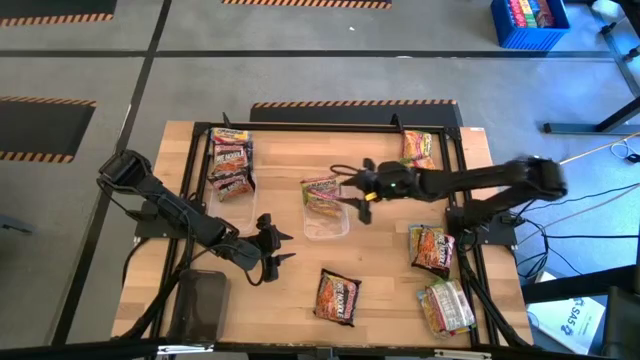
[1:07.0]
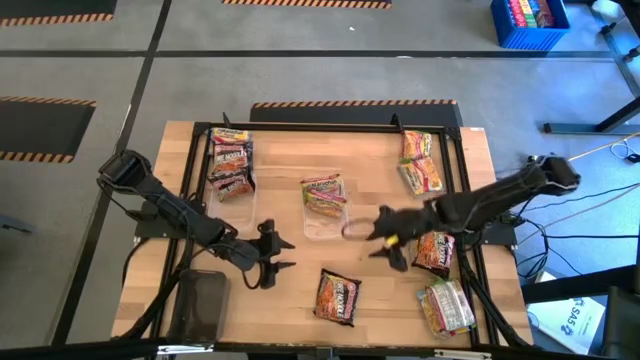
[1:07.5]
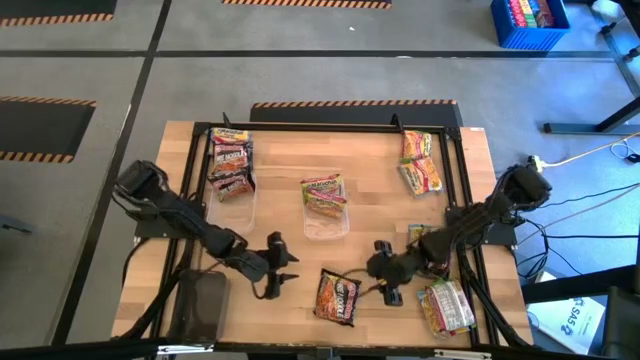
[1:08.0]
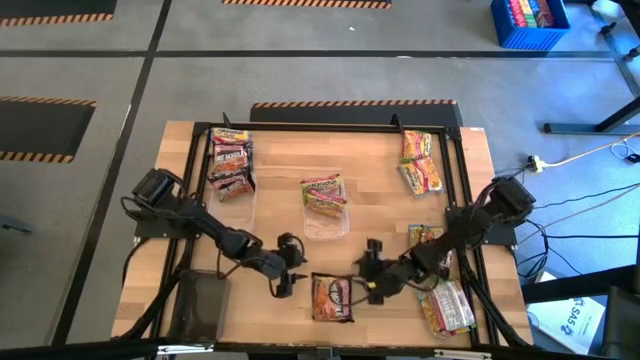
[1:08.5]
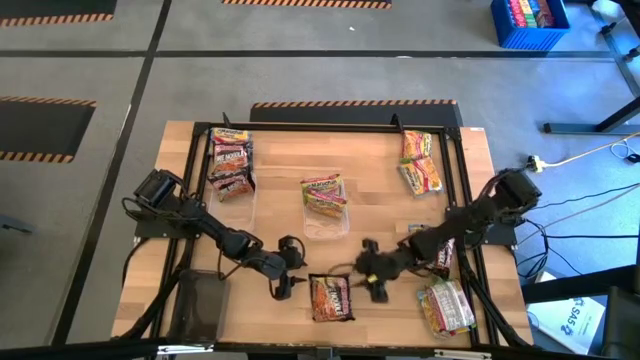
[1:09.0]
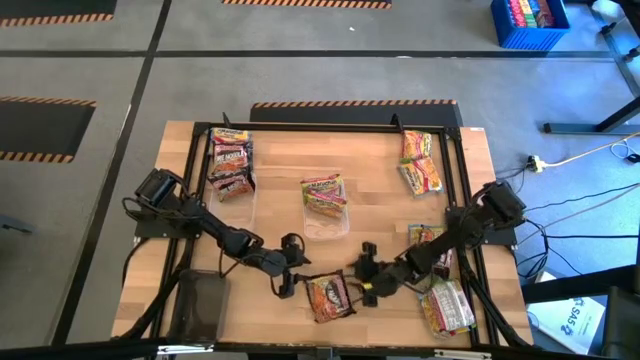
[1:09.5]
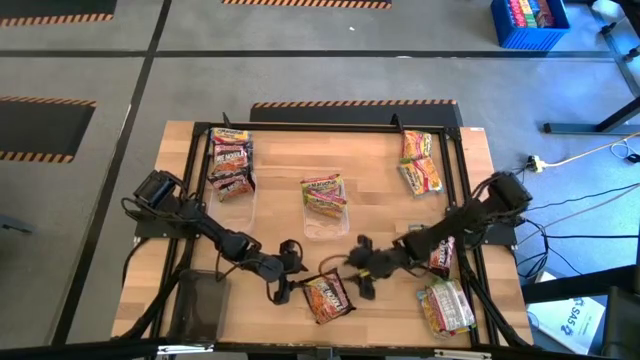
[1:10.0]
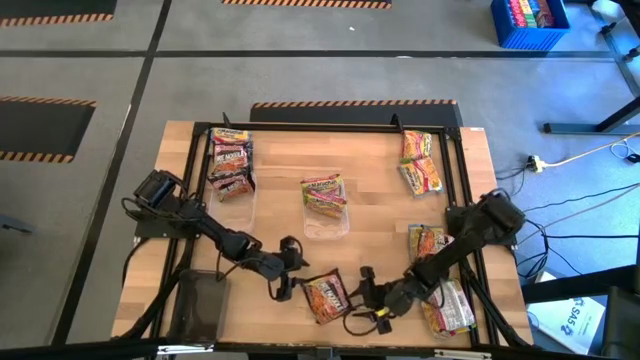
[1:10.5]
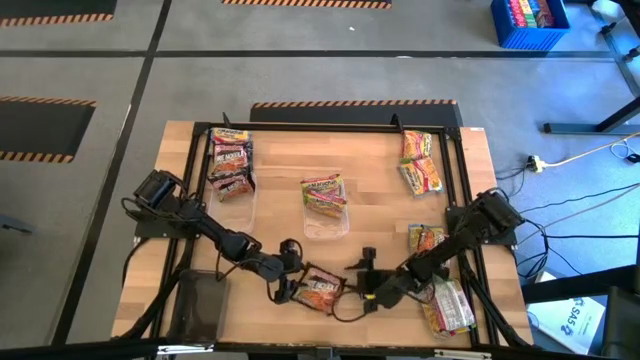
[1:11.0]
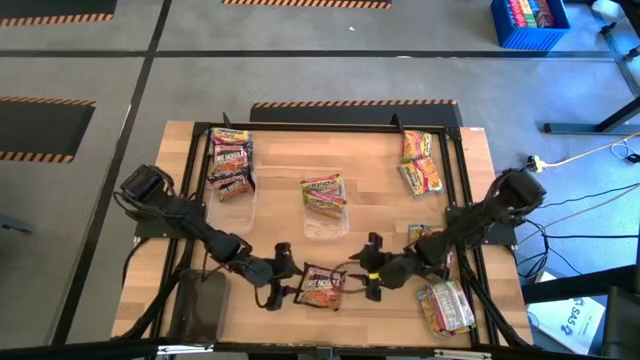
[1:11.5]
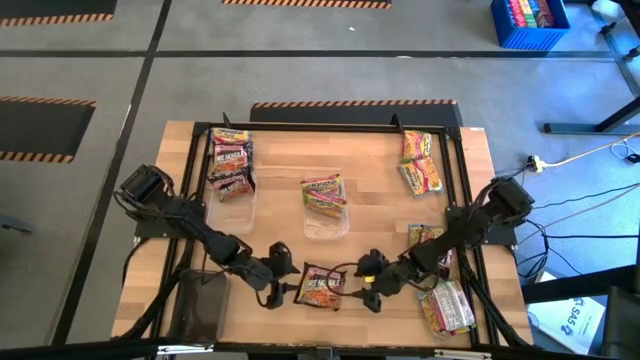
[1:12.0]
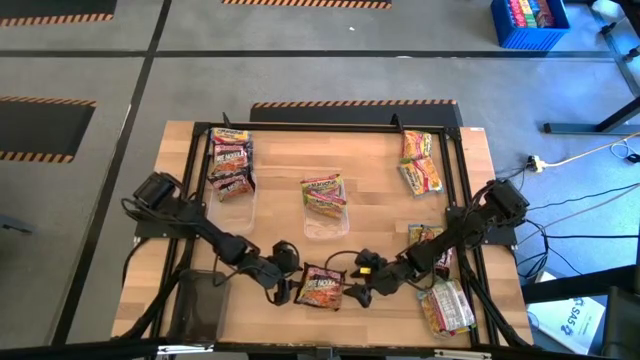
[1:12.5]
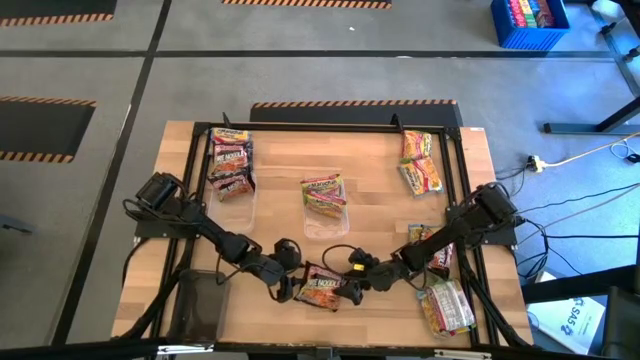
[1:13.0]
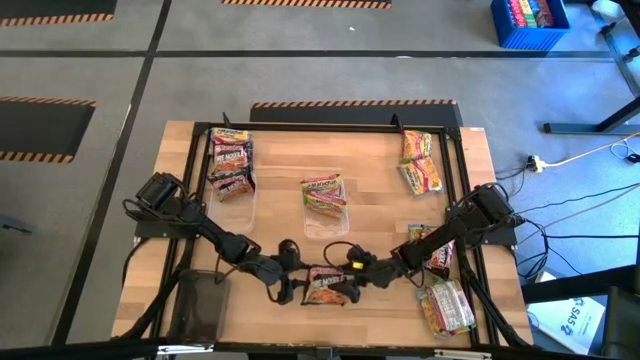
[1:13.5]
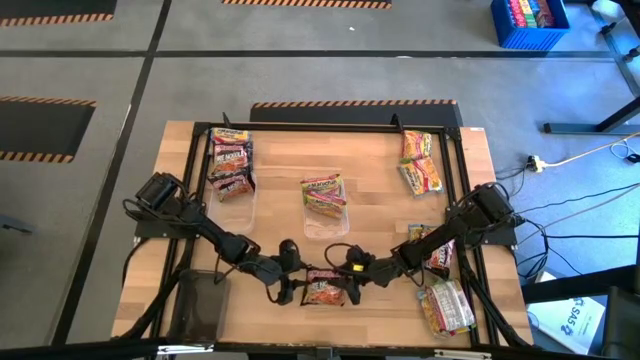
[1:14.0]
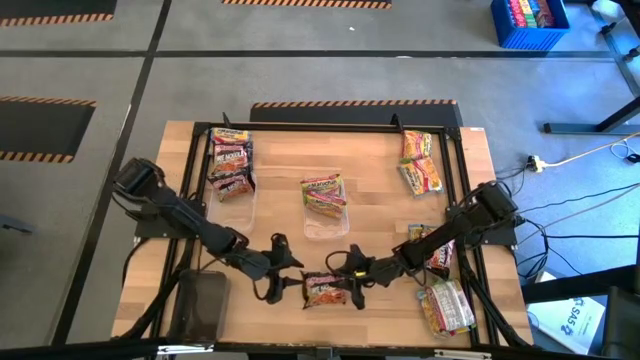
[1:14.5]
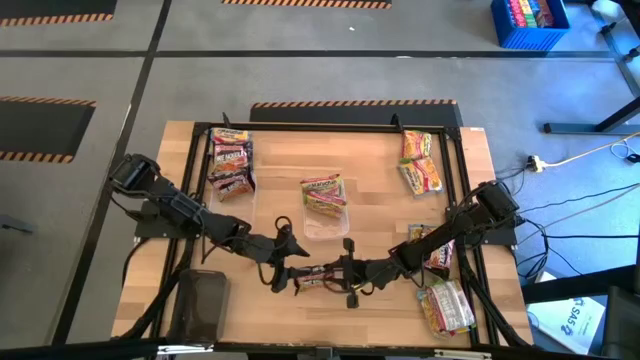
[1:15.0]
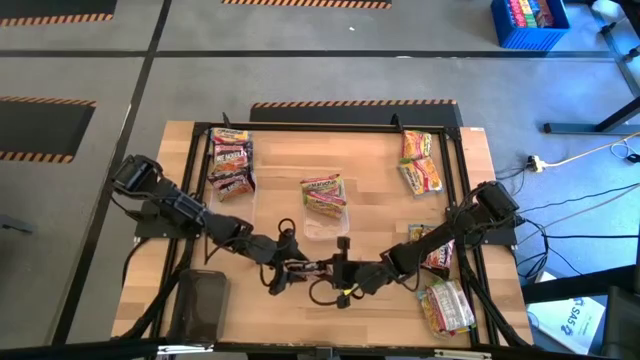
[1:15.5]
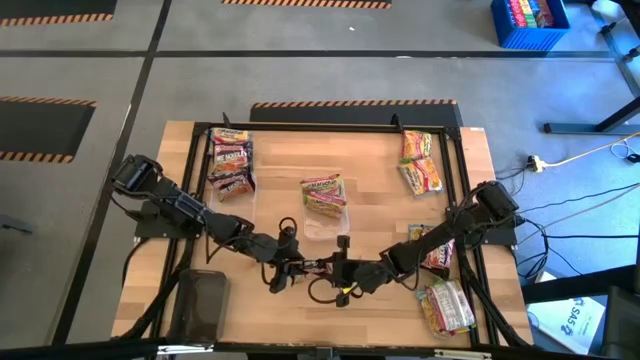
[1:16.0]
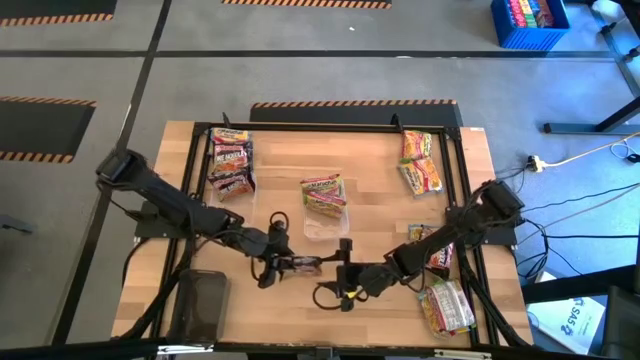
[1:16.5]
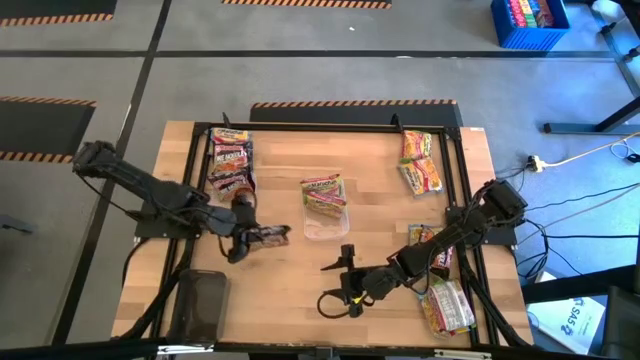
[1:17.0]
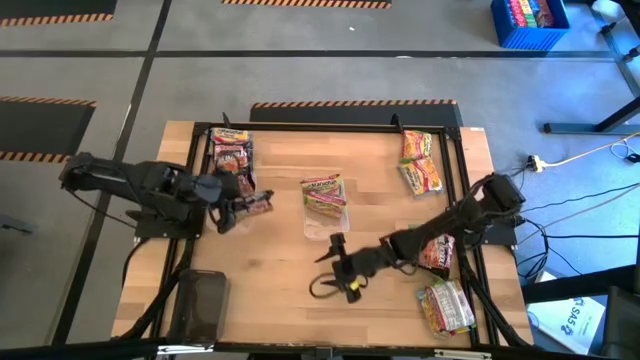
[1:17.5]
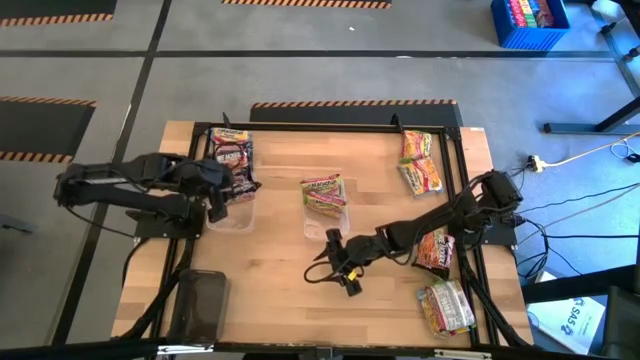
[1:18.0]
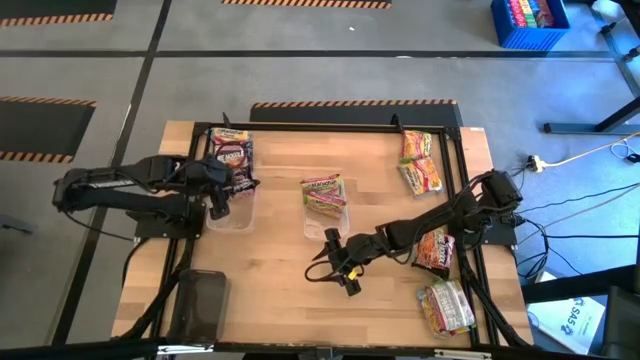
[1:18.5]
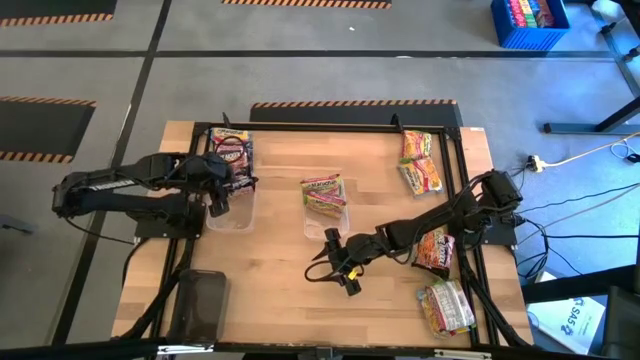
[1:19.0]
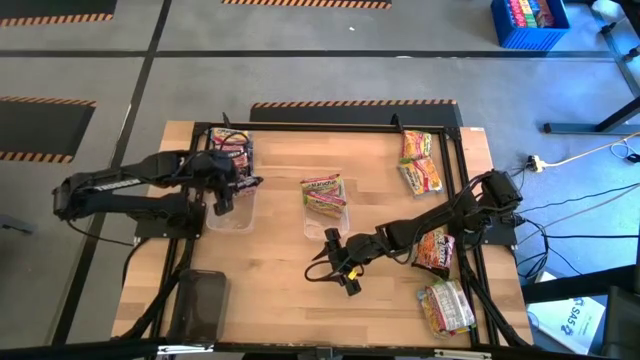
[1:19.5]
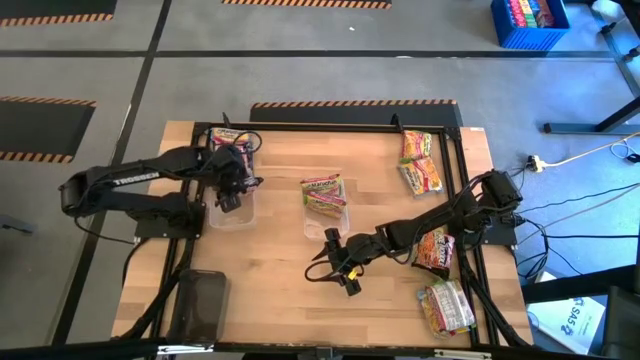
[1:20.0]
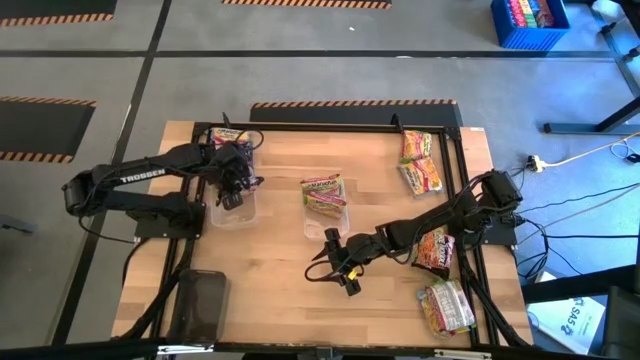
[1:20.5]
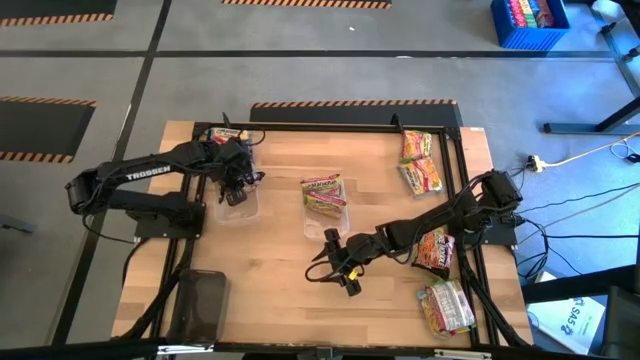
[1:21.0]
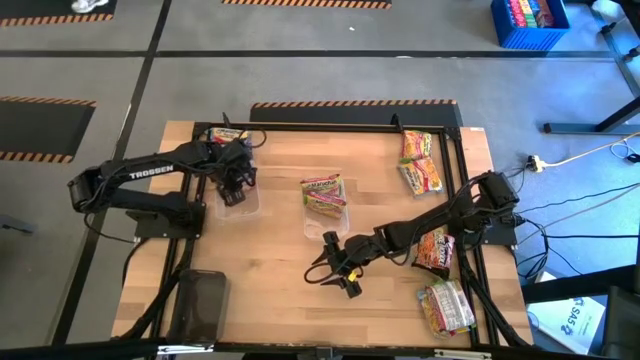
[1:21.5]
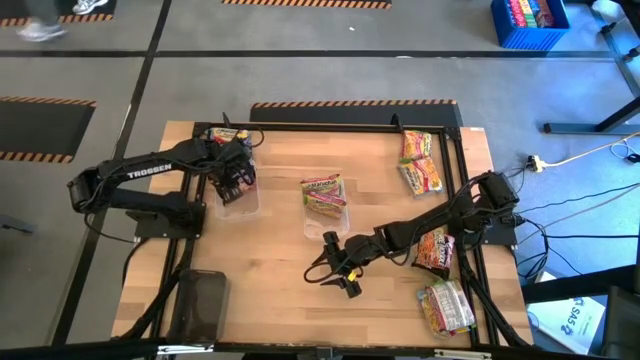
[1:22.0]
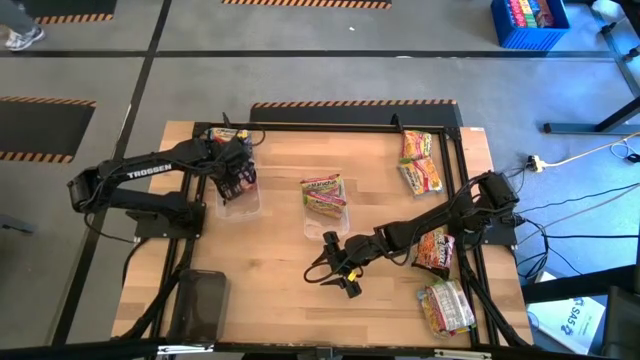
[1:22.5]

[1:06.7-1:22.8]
Task: Sort Maruchan noodles
Put the black noodle pack into the left transparent bin

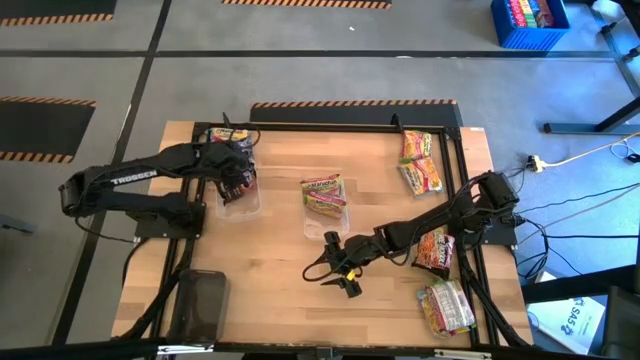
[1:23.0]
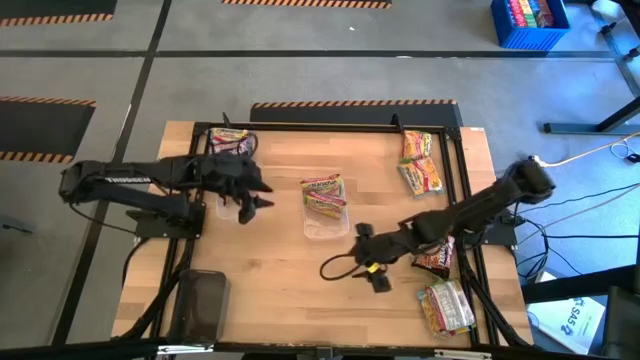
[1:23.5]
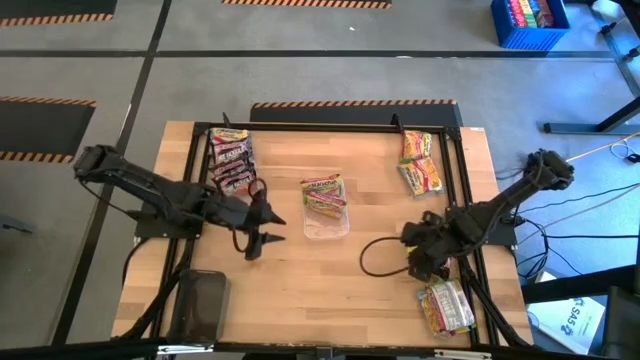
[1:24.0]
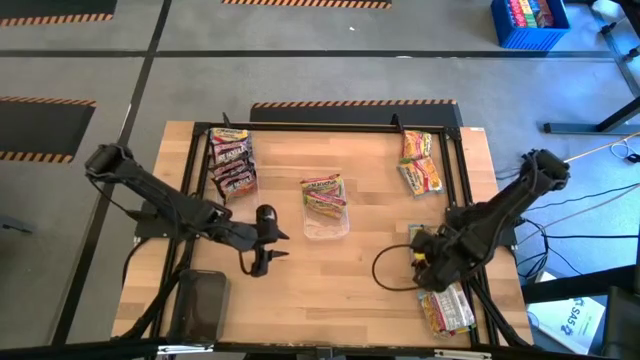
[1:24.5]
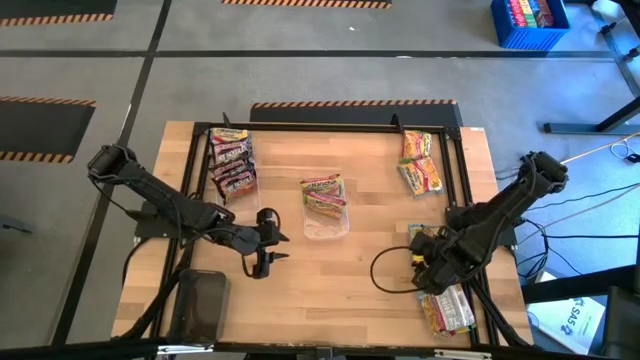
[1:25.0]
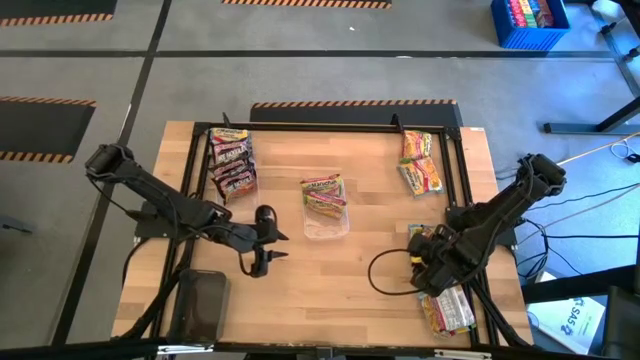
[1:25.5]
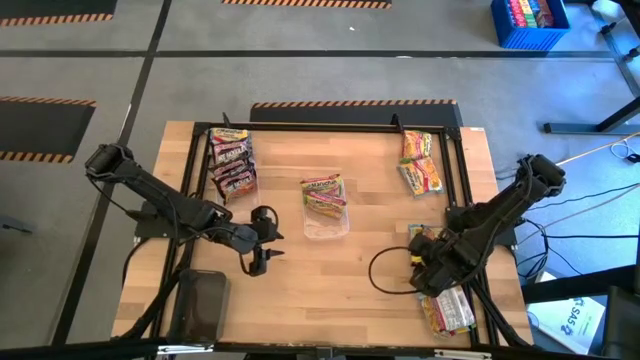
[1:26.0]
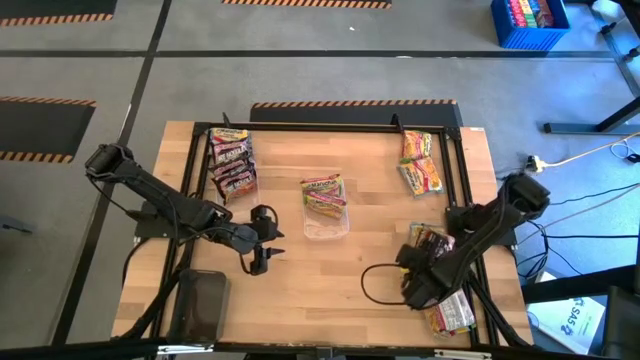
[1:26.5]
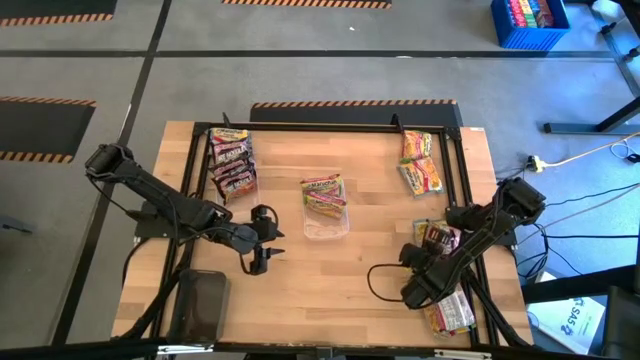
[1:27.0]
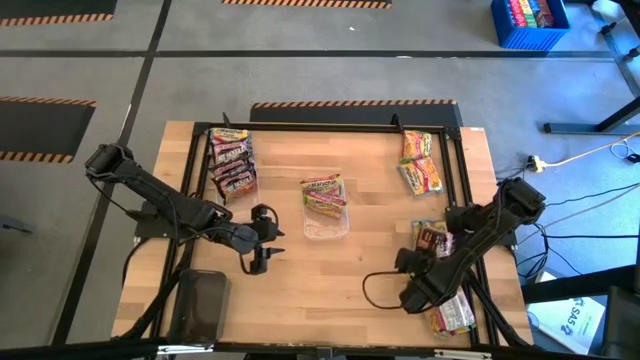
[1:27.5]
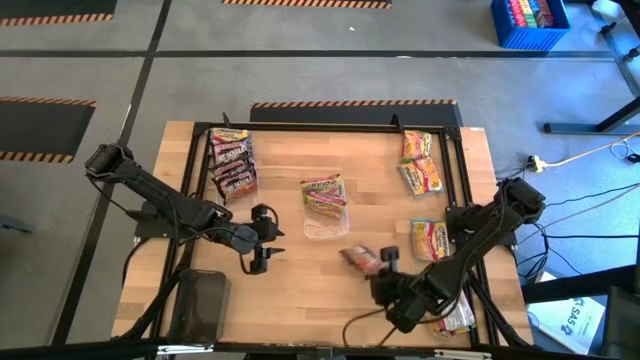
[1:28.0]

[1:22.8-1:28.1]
Put the black noodle pack into the left transparent bin
